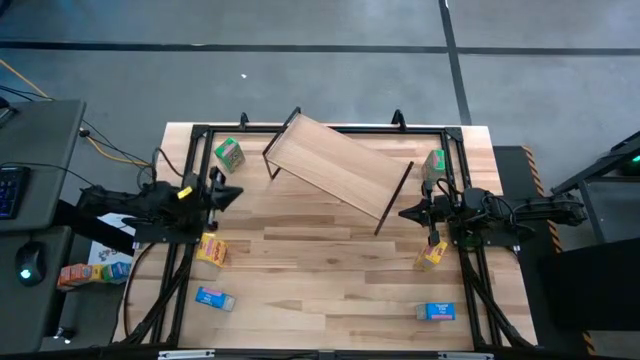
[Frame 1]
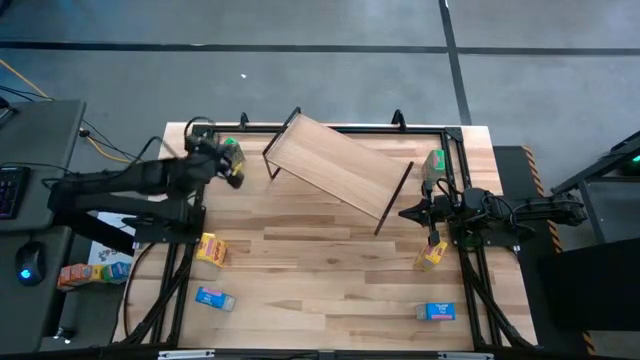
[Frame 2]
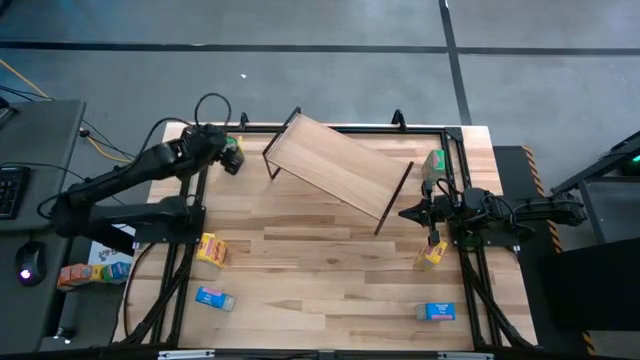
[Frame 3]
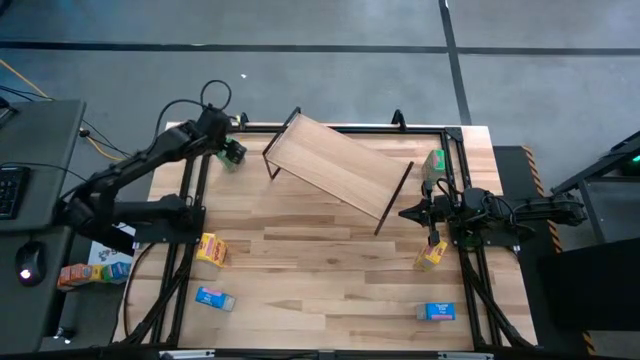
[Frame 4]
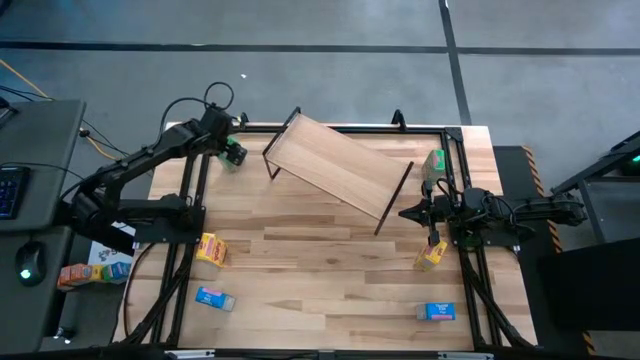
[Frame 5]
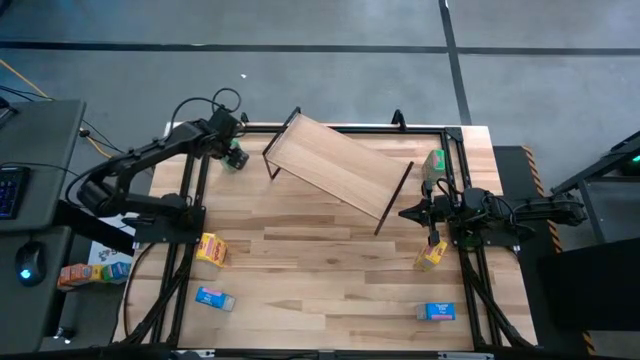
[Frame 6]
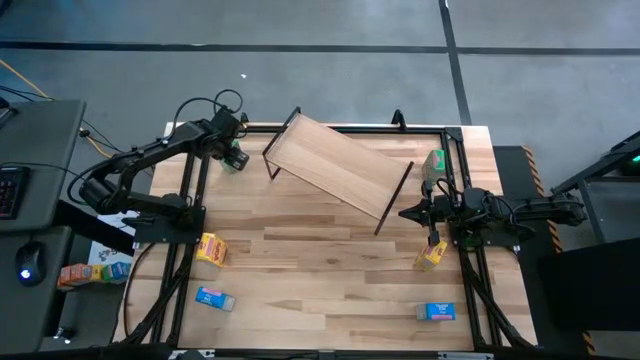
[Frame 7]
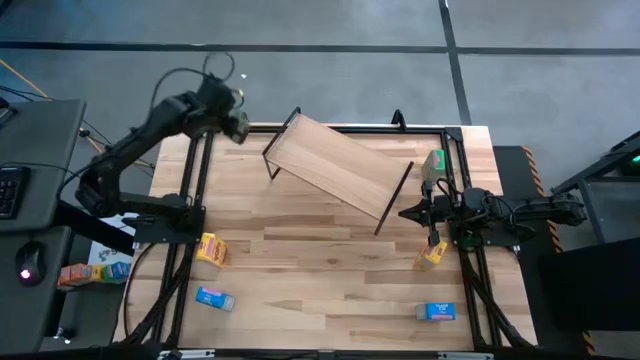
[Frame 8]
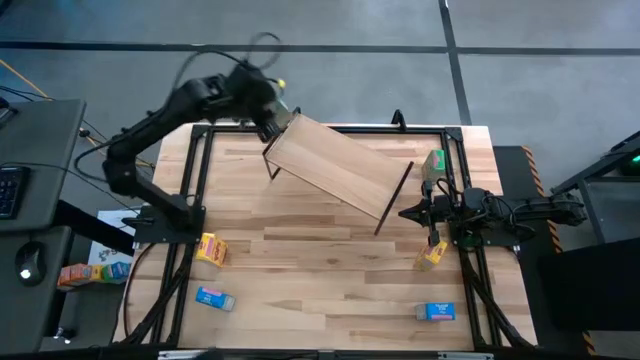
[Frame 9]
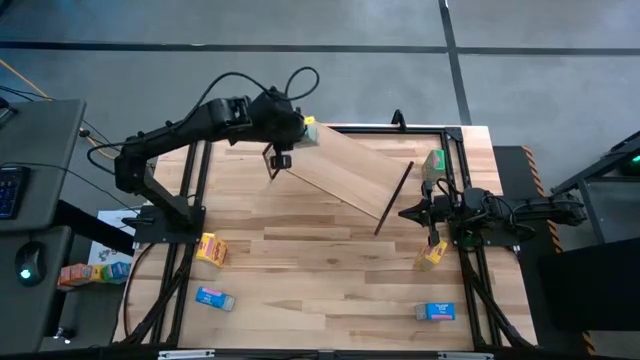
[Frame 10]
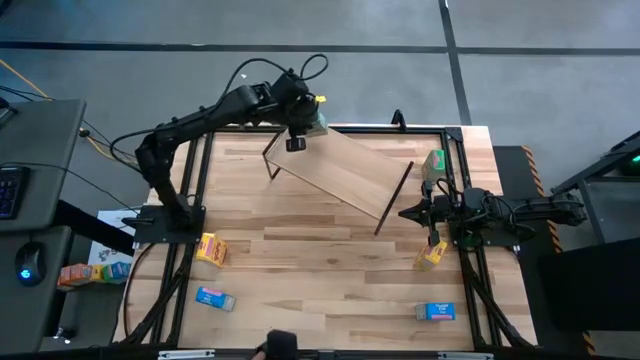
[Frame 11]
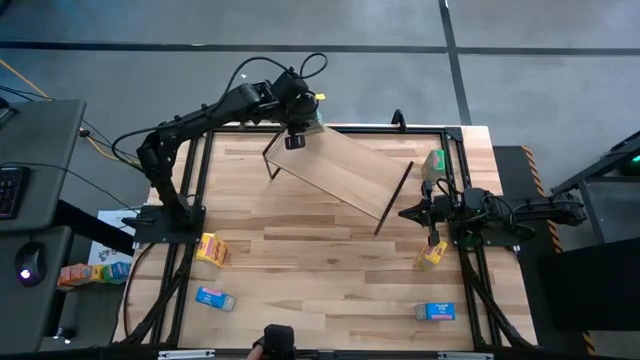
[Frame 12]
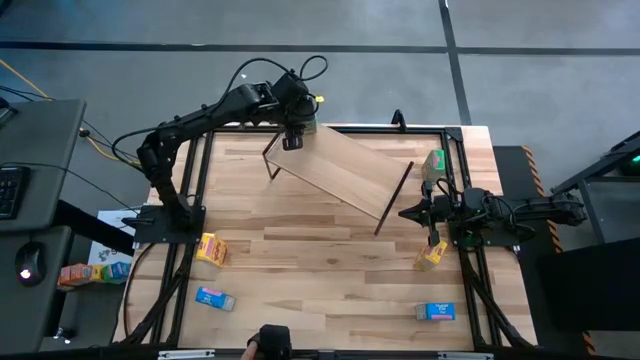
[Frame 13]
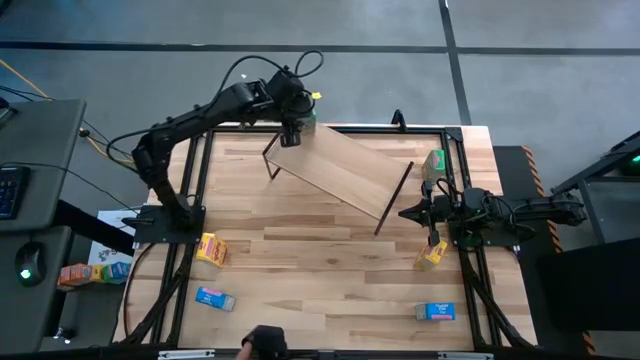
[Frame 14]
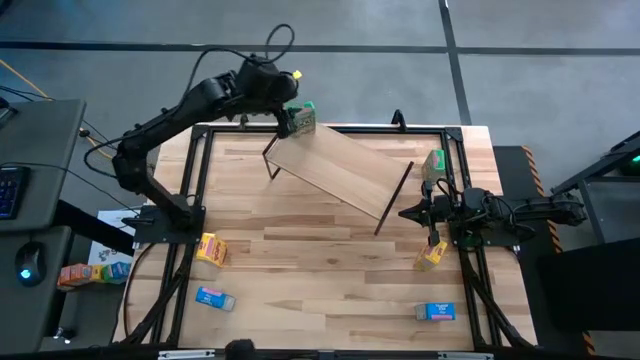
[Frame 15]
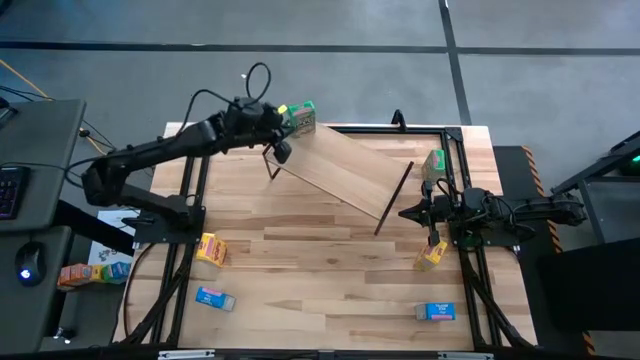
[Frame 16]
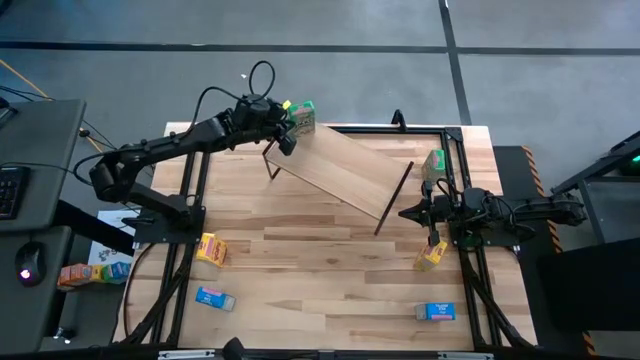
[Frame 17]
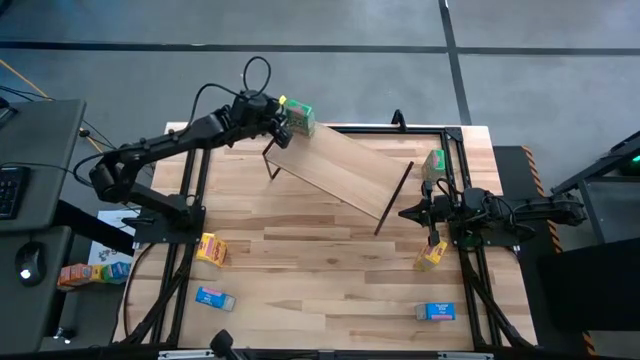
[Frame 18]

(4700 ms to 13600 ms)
Task: Stack cereal on shelf
Put the left green cereal box on the shelf

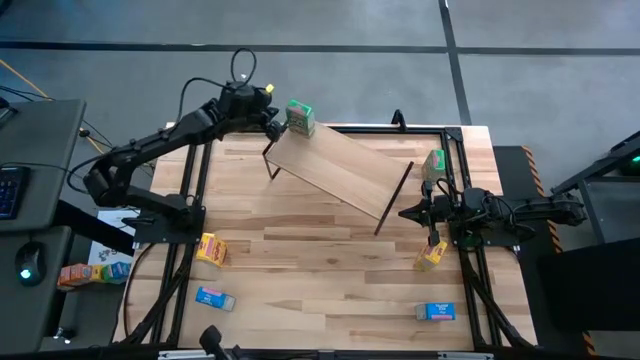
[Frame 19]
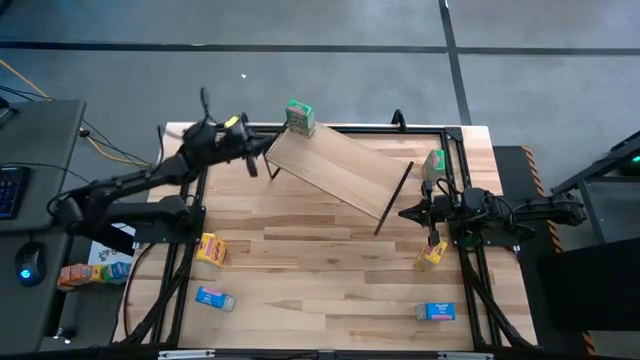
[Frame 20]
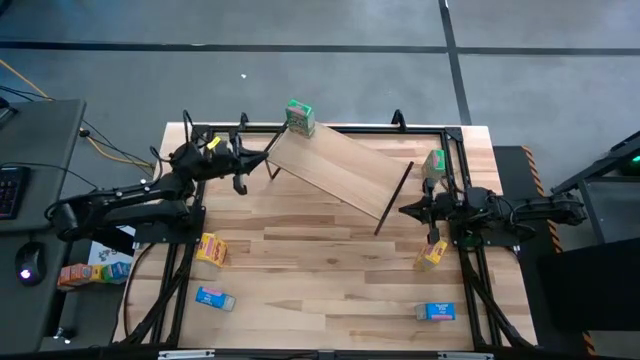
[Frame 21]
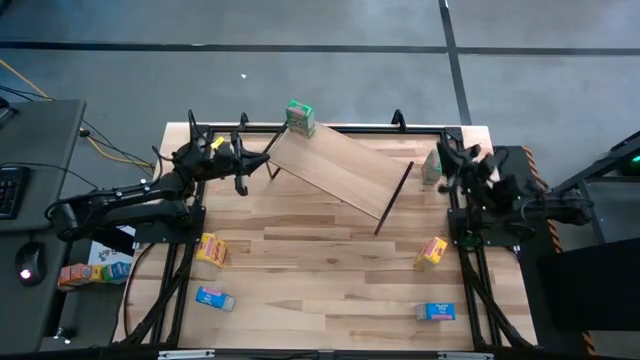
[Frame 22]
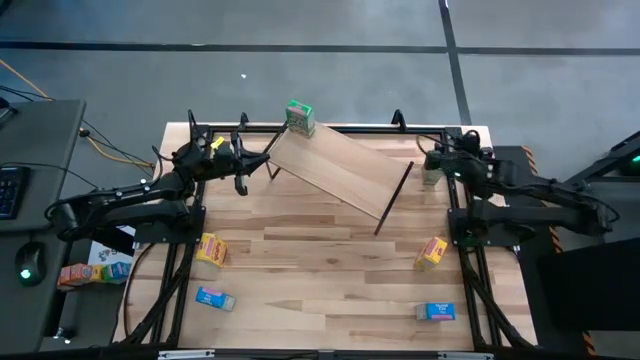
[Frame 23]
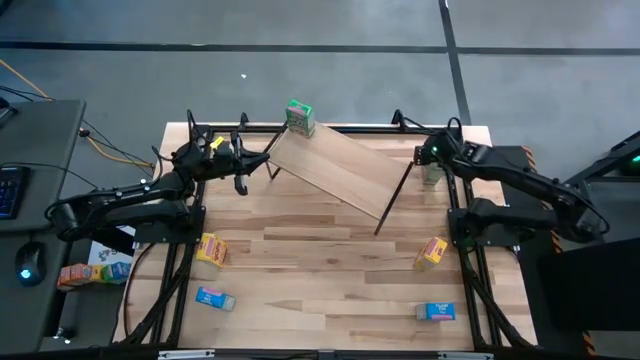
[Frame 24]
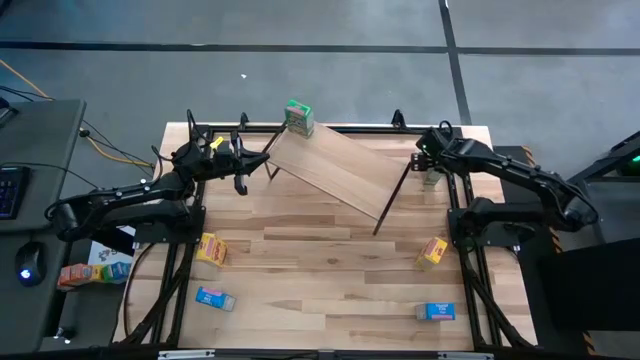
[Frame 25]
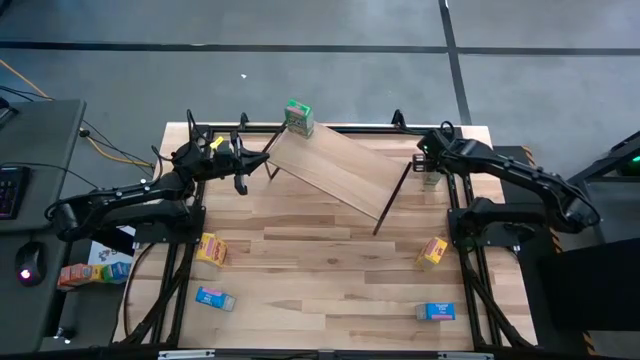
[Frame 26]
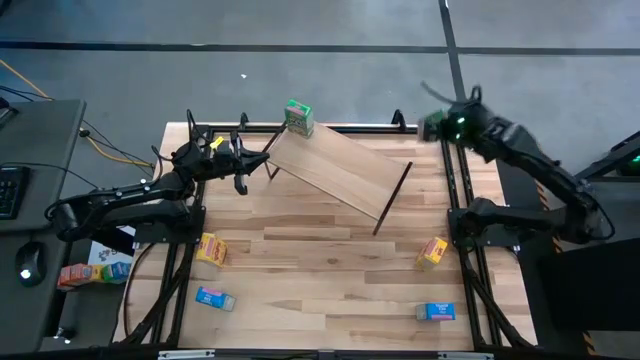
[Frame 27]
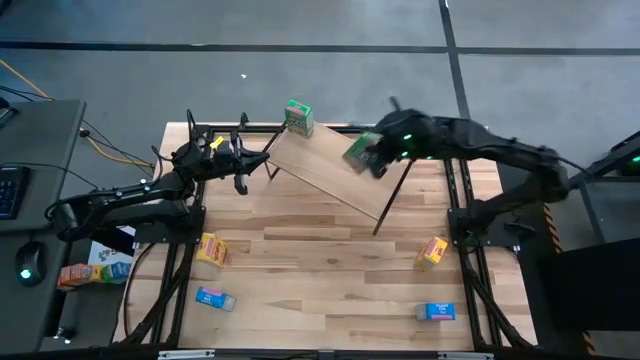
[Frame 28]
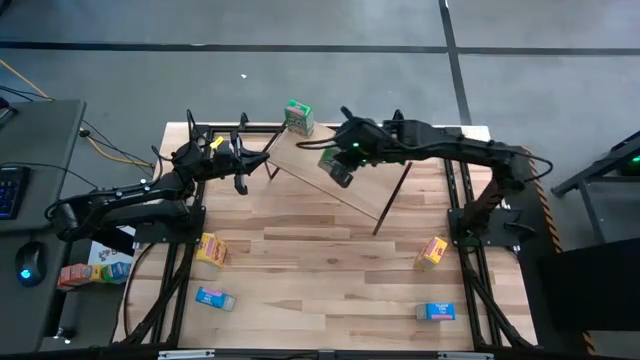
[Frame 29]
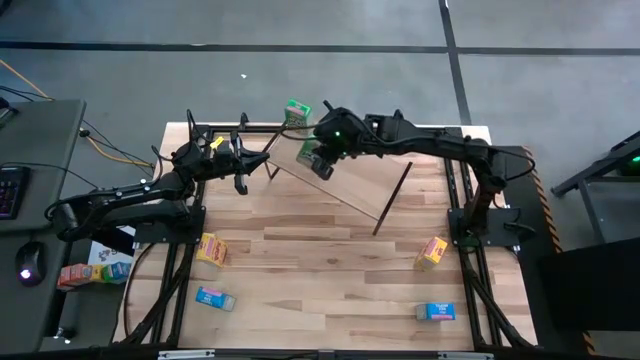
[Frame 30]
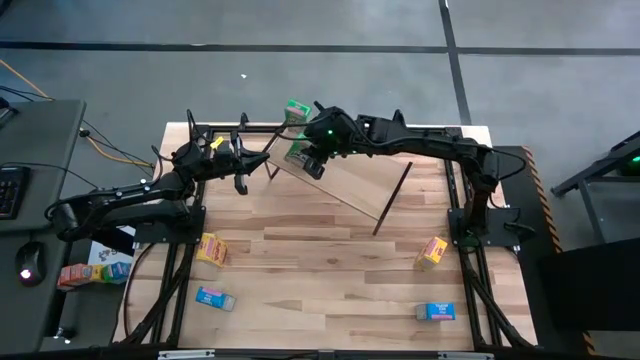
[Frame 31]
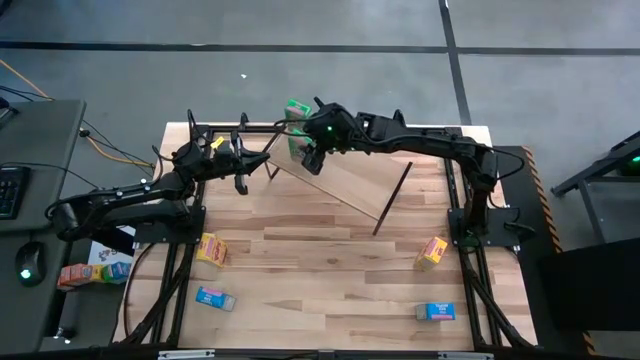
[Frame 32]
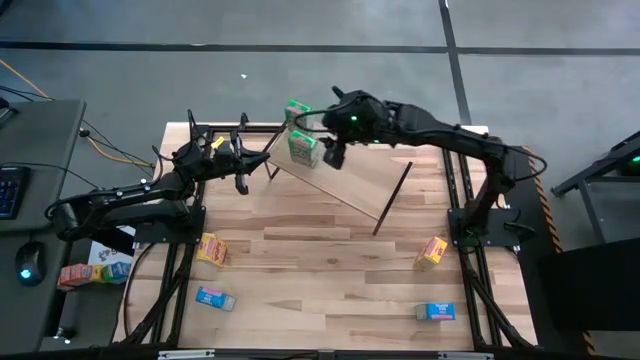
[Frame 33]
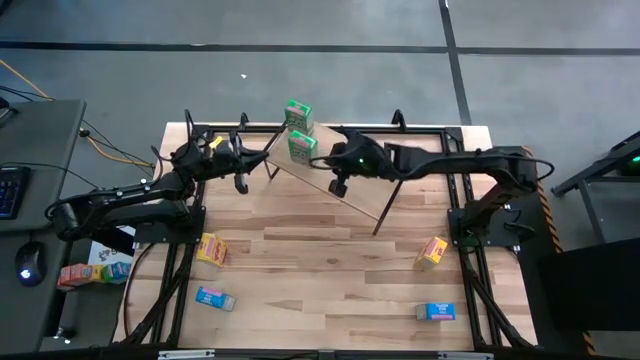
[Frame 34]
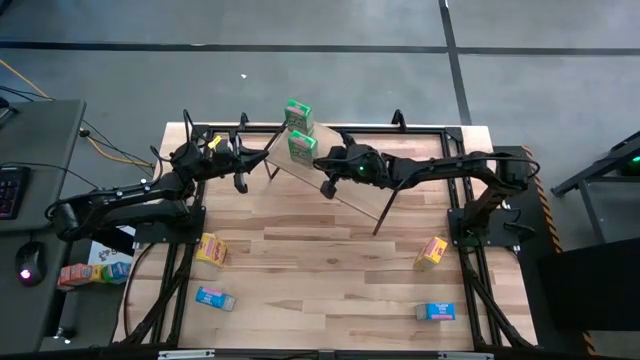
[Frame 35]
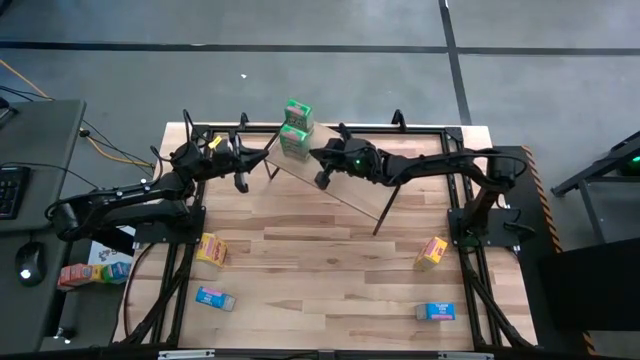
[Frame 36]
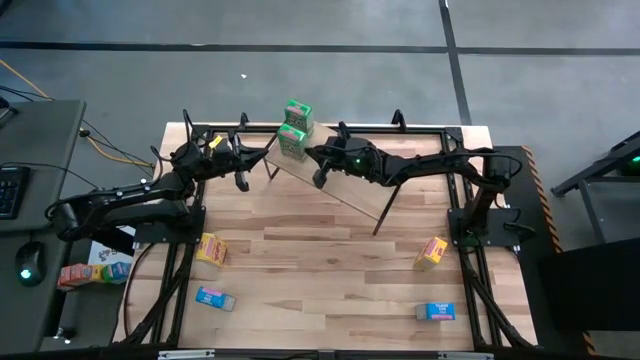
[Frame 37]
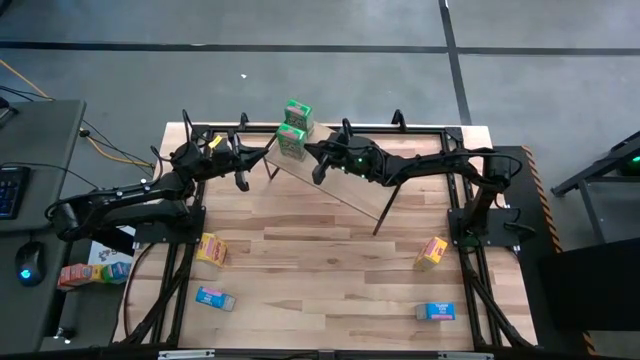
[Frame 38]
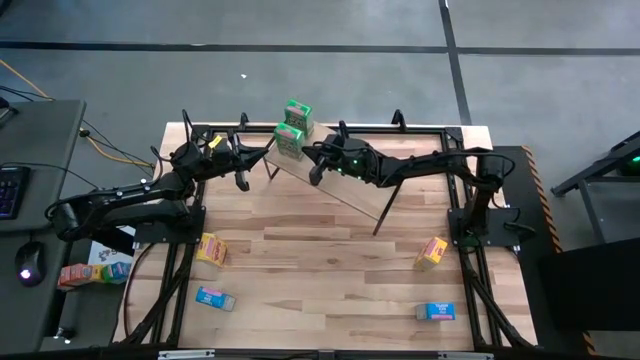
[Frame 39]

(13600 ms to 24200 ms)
Put the green cereal box on the shelf aligned with the other green cereal box

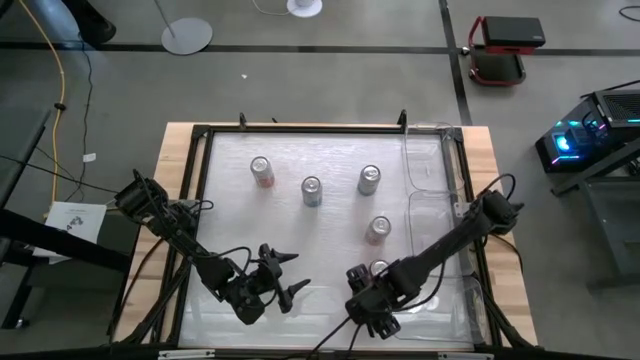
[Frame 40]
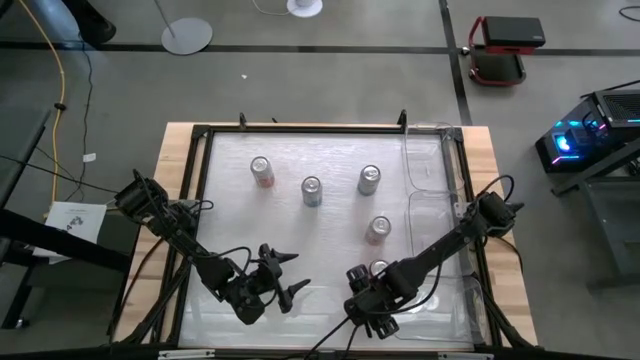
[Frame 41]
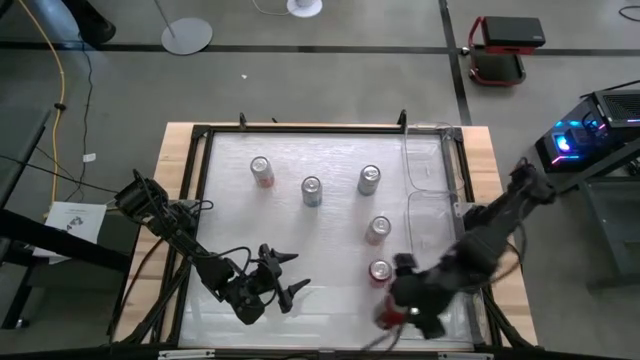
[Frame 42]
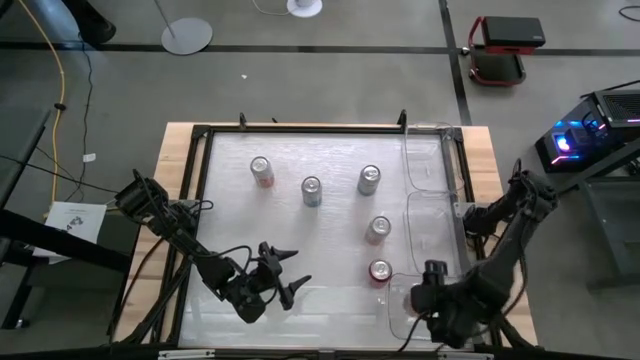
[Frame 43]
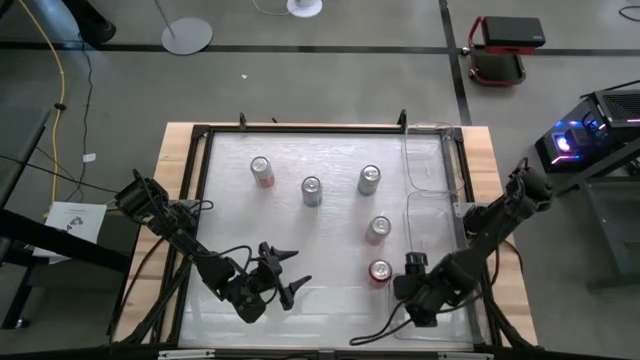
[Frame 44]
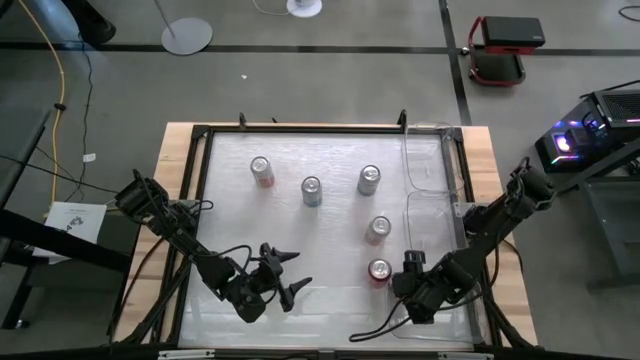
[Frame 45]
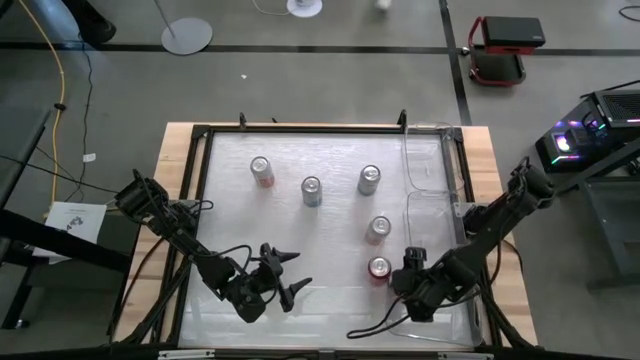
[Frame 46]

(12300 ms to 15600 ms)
Task: Sort soda cans
Put the bottom red-black soda can into the bottom transparent bin
